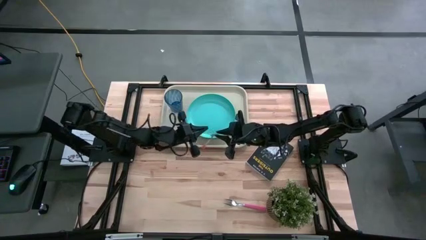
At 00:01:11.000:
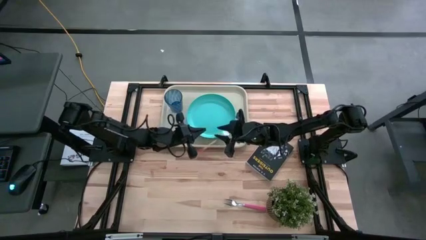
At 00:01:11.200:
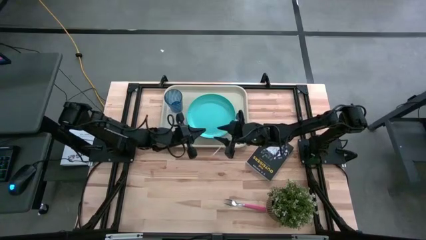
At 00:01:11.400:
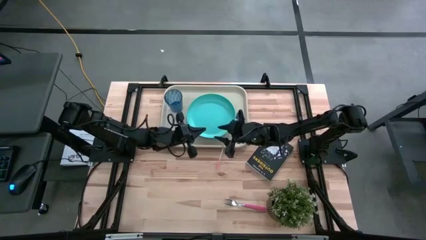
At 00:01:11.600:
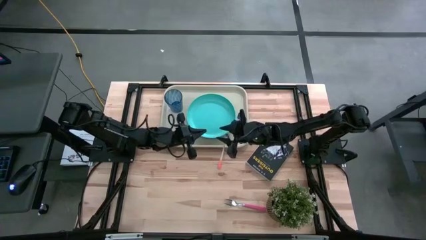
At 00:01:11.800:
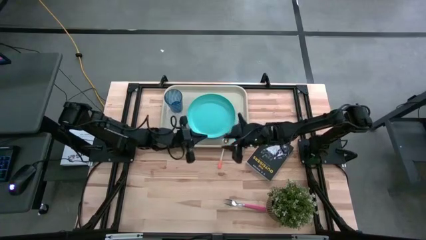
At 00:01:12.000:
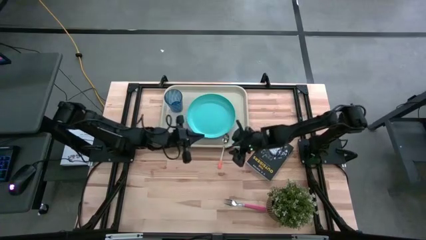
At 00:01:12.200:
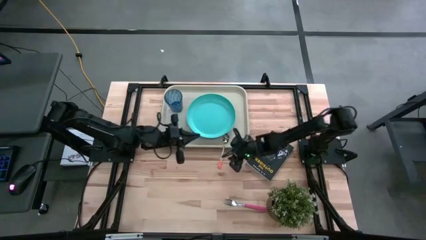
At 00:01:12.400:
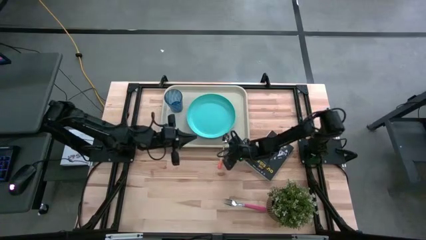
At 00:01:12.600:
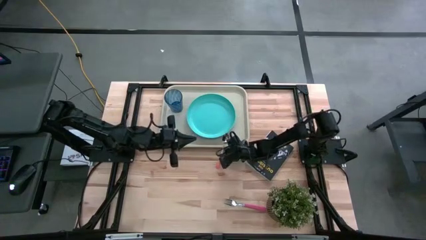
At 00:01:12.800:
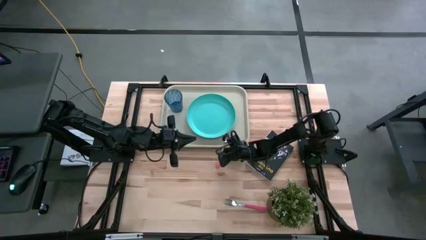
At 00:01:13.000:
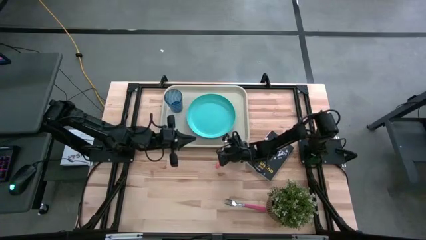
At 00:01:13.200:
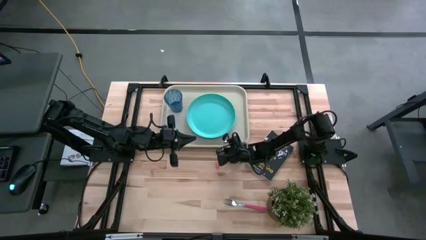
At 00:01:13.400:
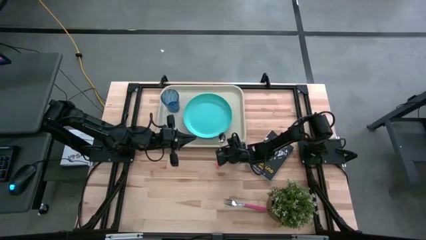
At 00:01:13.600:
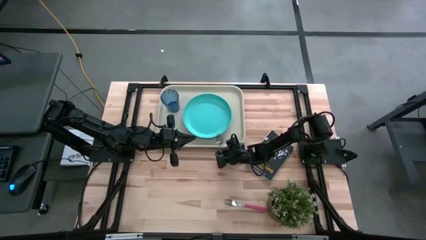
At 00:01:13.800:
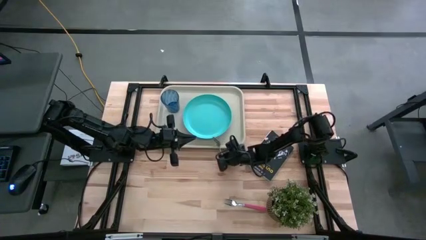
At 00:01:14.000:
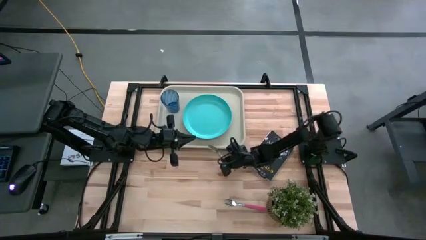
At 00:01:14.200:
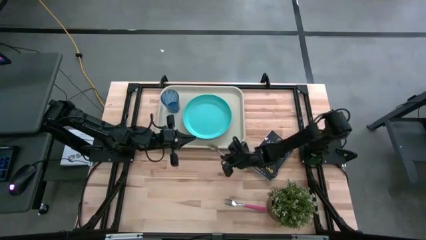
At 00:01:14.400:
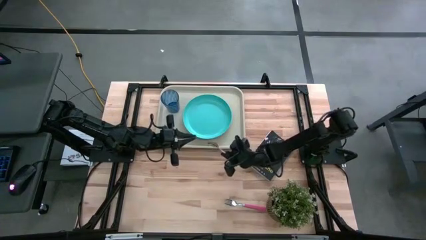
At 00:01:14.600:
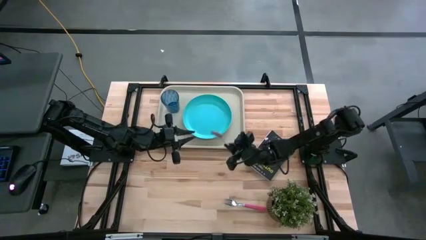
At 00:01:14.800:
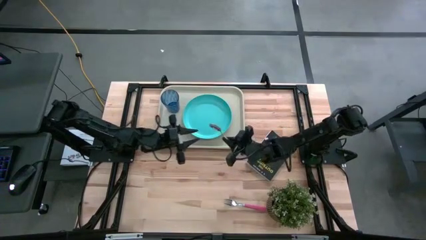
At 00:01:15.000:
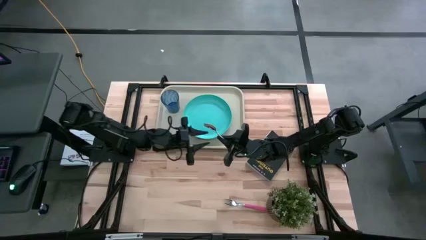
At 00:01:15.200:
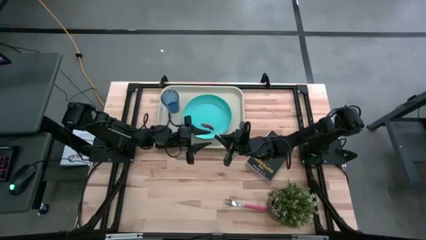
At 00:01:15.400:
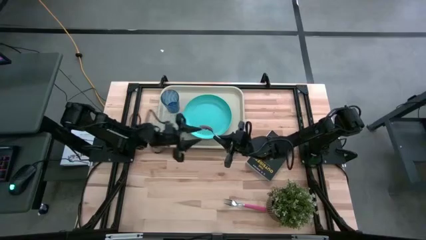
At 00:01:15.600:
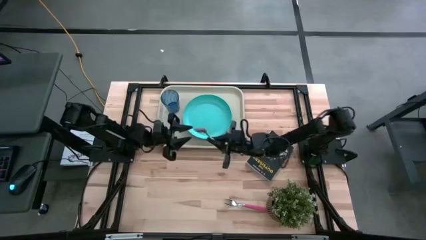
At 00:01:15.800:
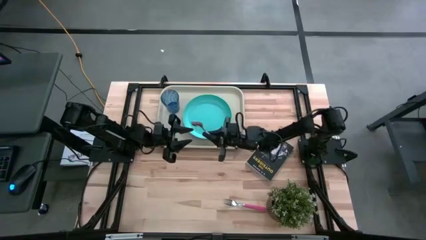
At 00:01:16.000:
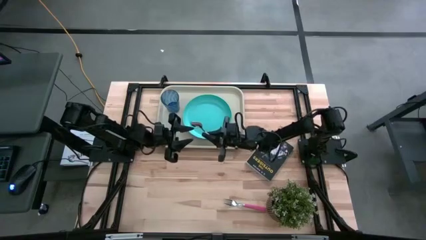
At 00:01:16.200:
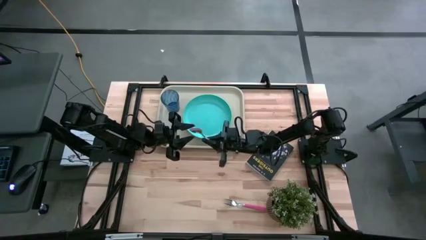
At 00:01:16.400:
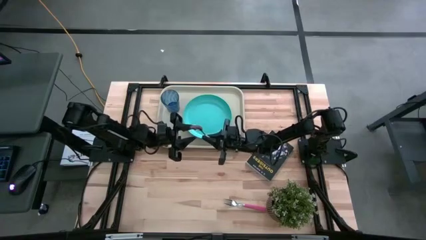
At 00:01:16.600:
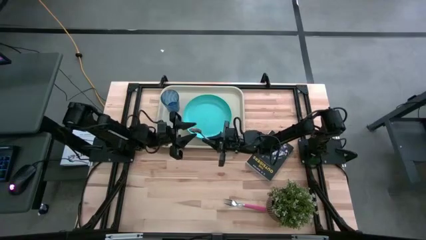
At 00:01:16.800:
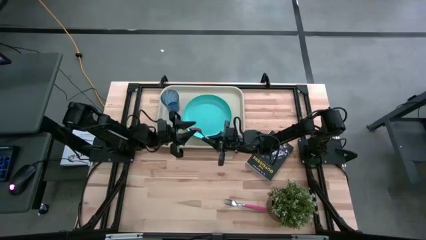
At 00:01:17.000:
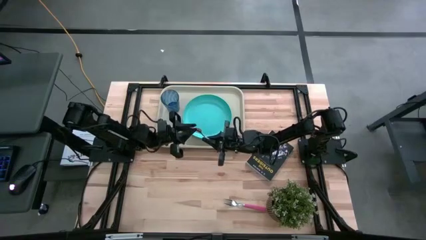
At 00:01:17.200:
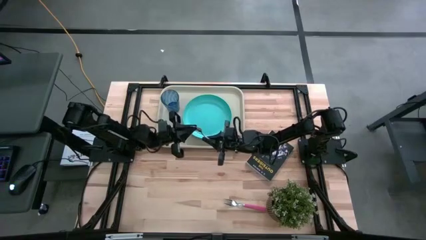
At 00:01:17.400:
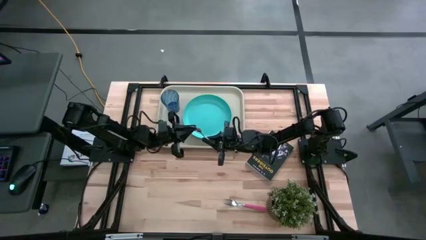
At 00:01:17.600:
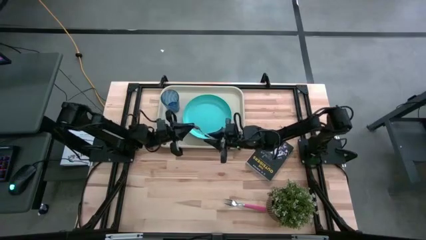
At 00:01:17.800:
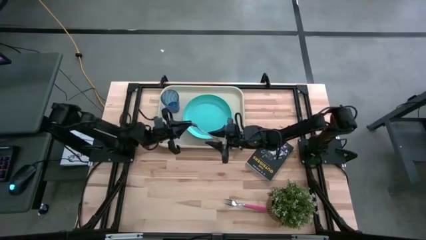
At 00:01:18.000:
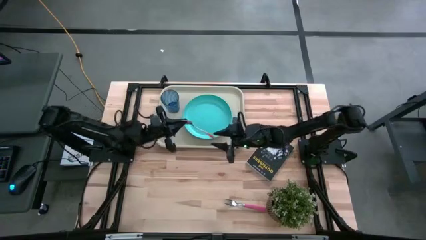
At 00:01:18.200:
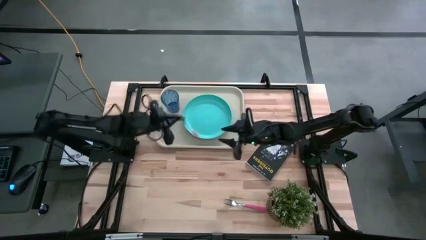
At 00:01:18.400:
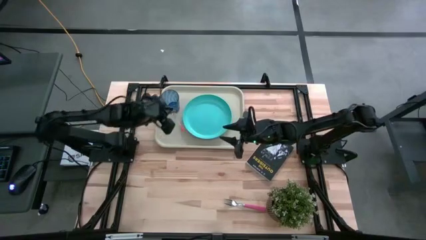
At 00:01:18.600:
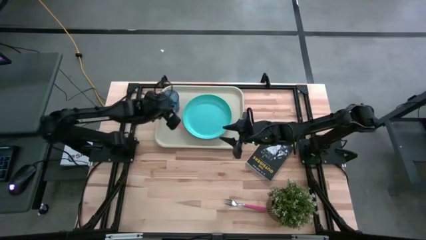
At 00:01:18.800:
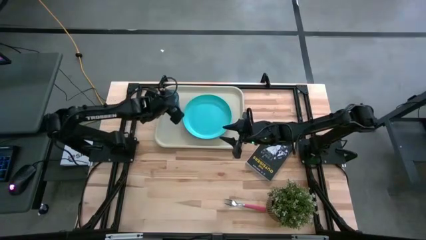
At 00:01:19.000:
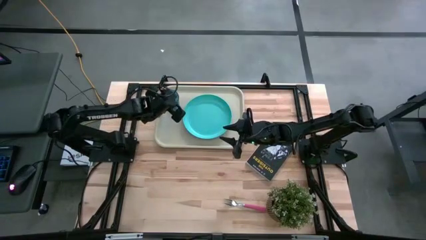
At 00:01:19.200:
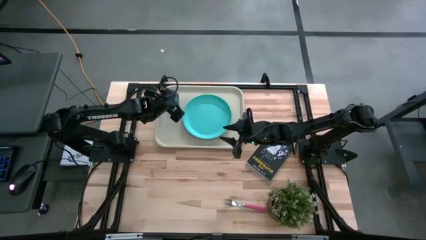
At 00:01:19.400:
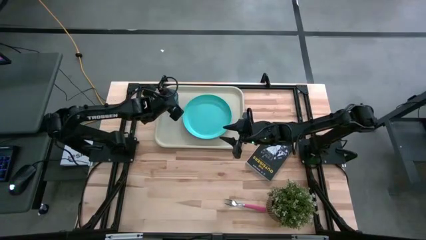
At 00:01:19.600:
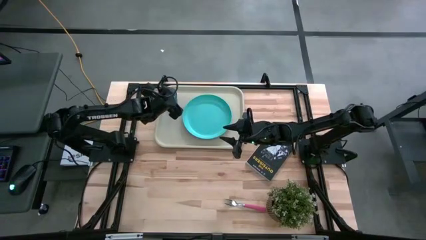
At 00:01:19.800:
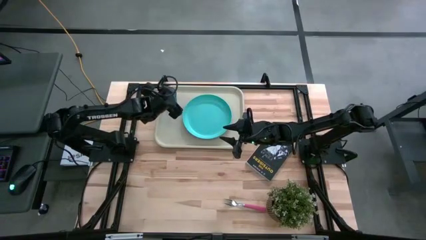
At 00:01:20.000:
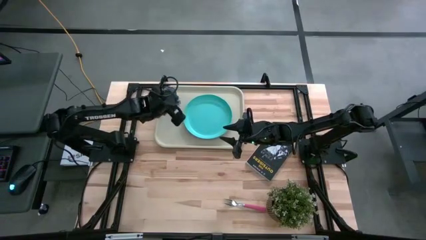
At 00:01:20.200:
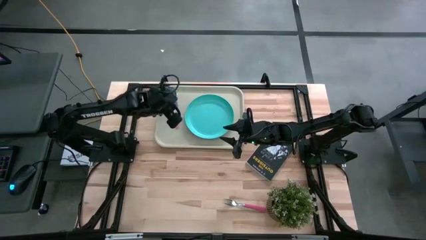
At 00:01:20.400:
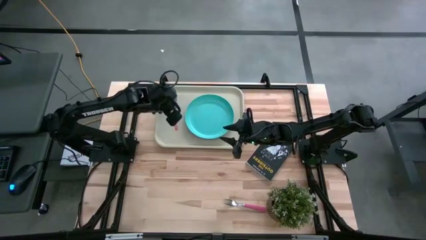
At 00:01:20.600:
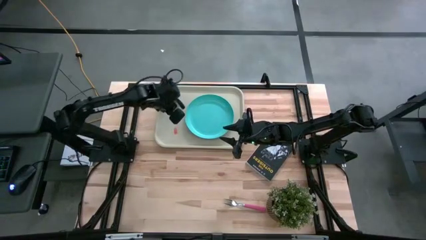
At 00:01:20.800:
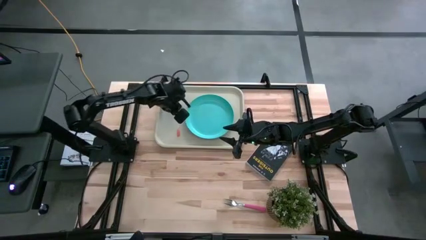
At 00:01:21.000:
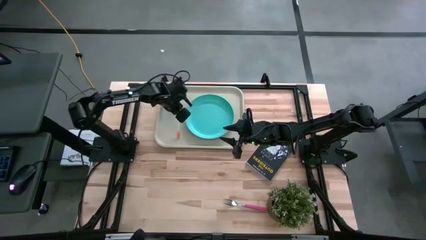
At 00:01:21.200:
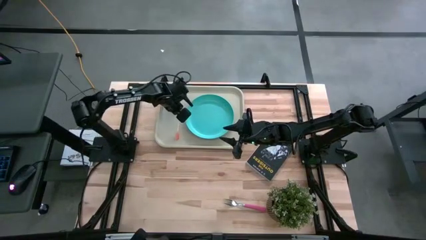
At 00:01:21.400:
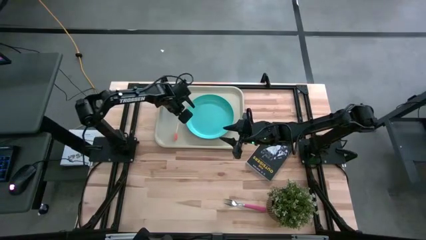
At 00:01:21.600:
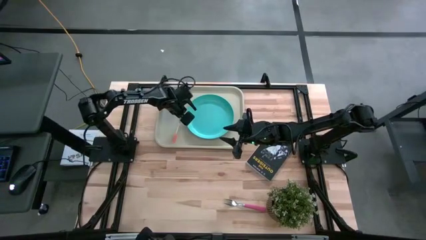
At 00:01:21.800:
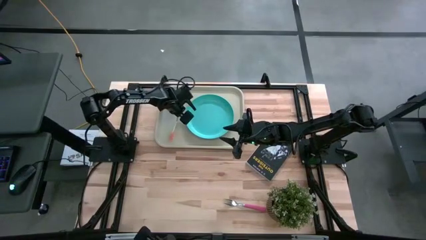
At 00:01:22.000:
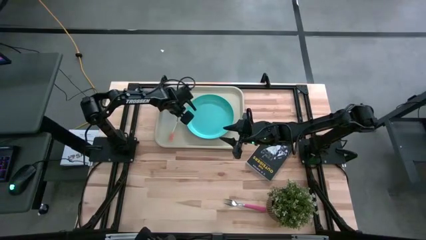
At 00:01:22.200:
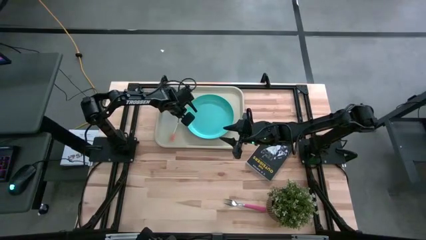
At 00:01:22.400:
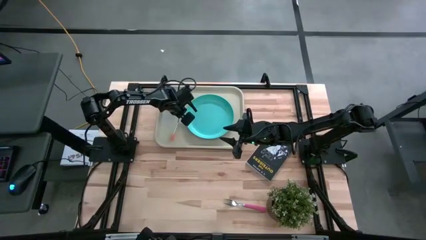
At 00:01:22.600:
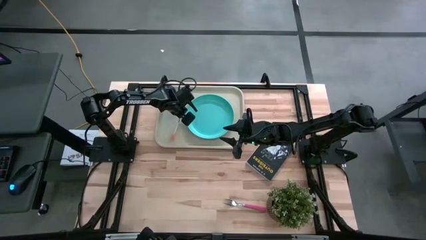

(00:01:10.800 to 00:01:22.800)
Task: Pick and place plate/cup/fork/spoon on tray
Put the orange spoon on the white tray beside the light blue plate
